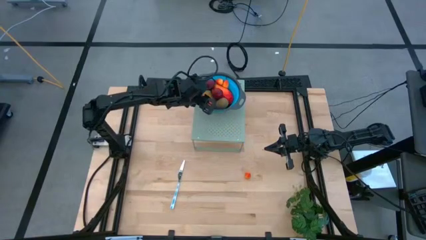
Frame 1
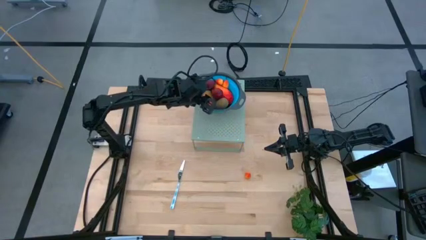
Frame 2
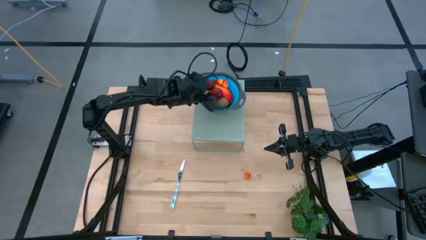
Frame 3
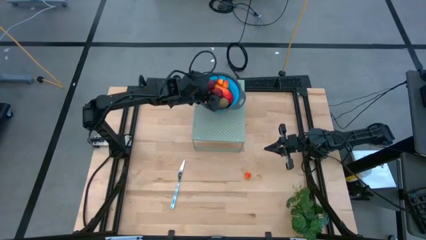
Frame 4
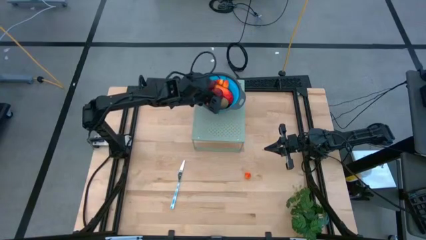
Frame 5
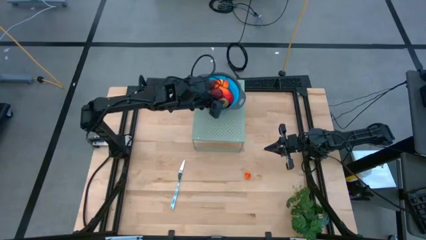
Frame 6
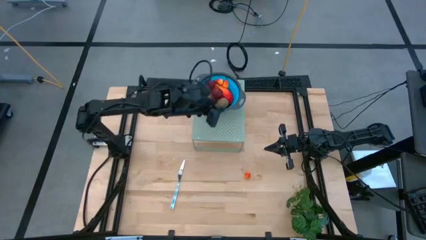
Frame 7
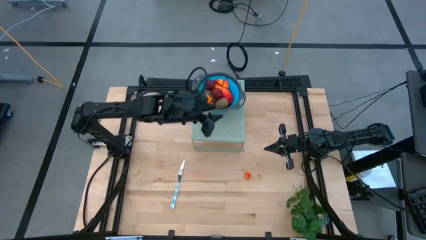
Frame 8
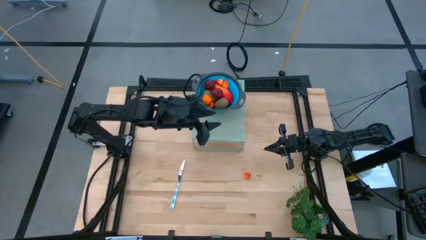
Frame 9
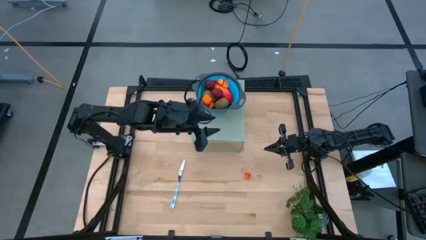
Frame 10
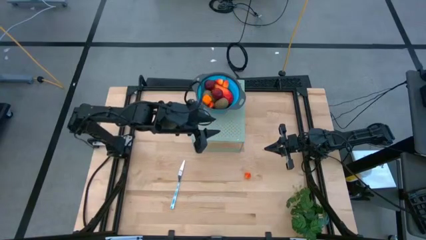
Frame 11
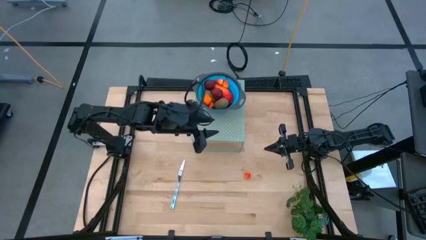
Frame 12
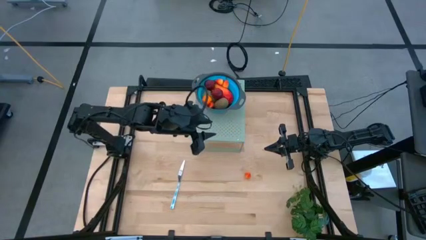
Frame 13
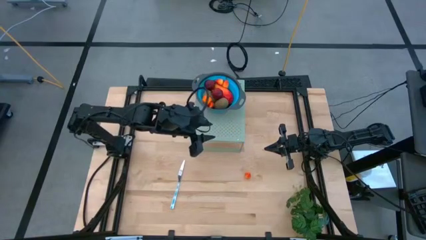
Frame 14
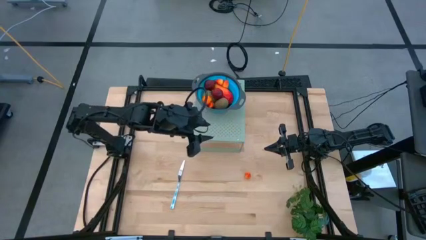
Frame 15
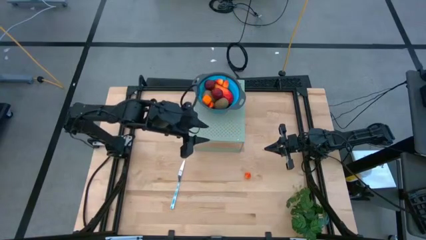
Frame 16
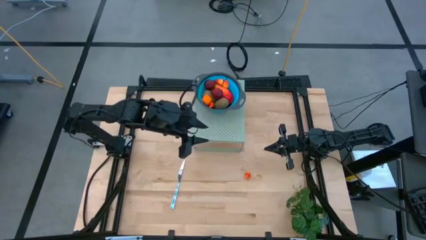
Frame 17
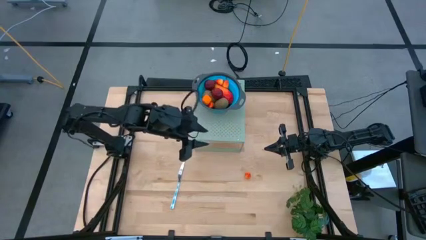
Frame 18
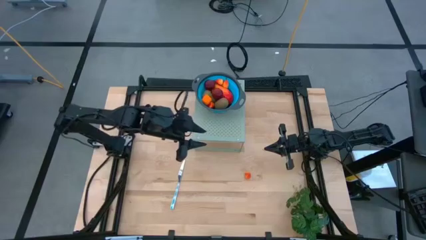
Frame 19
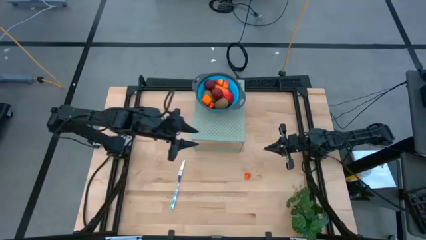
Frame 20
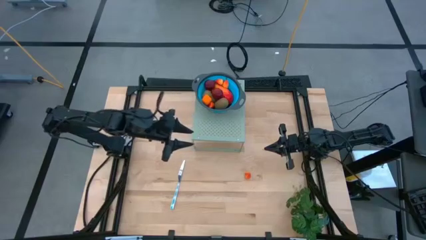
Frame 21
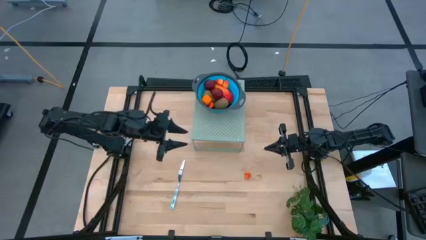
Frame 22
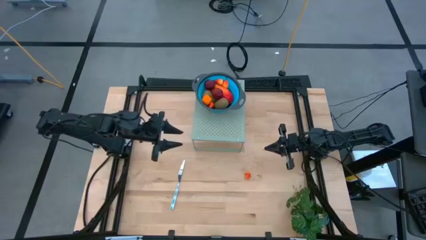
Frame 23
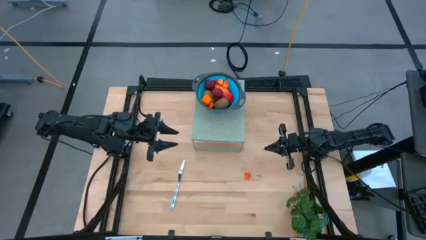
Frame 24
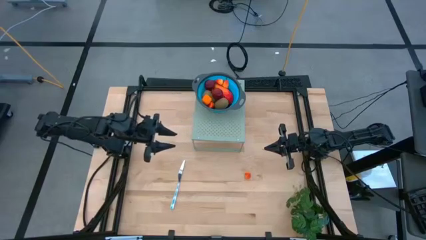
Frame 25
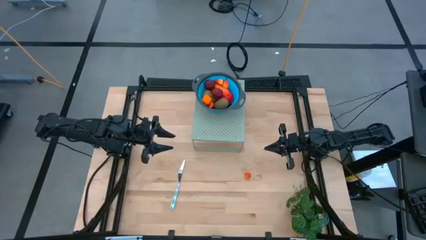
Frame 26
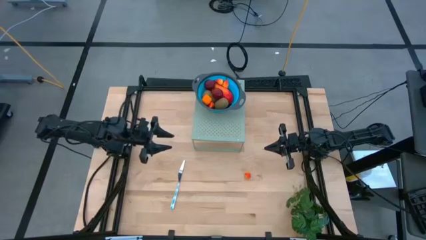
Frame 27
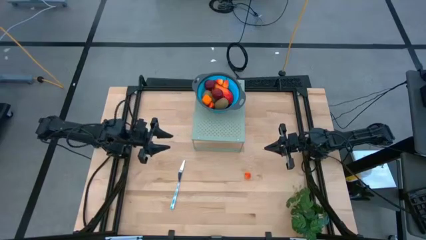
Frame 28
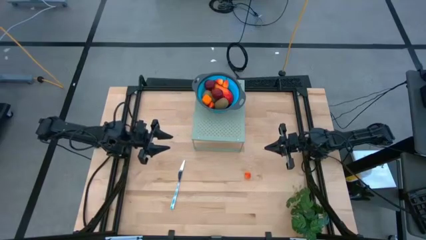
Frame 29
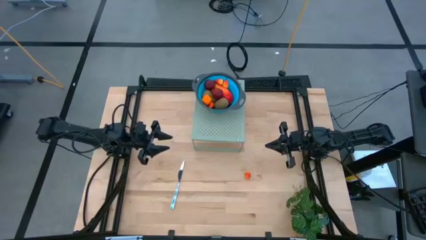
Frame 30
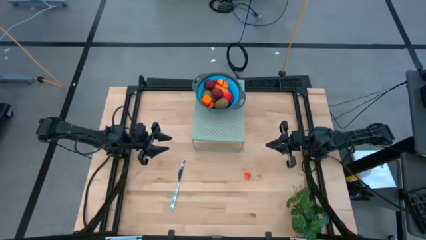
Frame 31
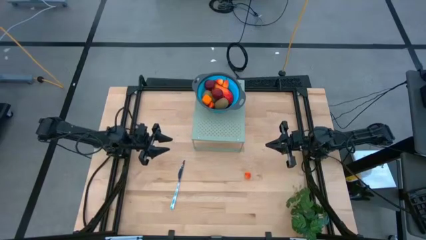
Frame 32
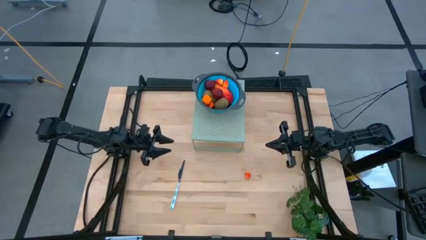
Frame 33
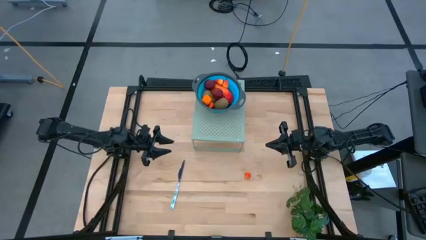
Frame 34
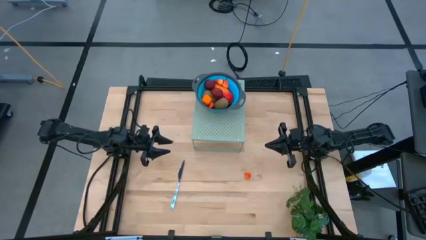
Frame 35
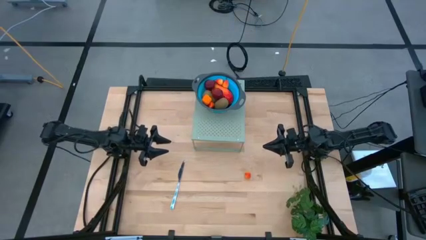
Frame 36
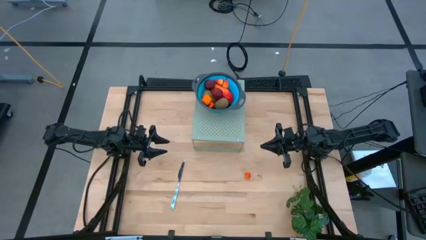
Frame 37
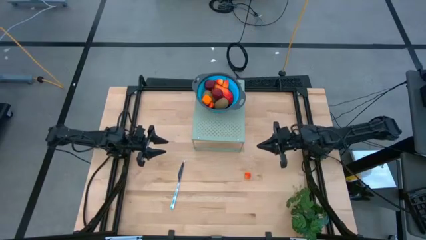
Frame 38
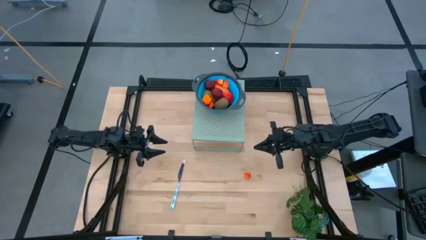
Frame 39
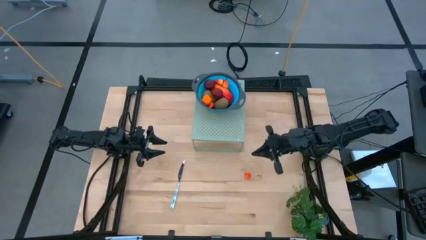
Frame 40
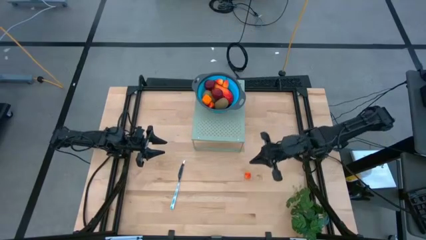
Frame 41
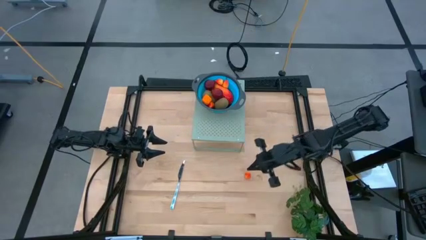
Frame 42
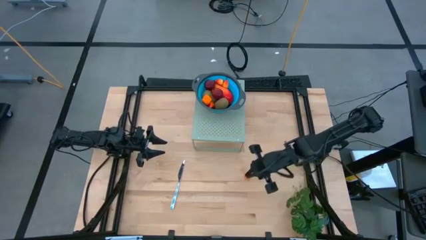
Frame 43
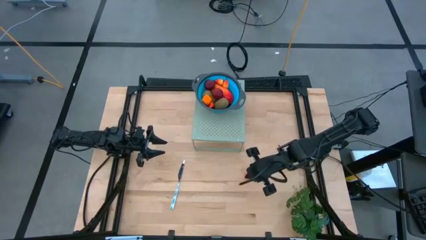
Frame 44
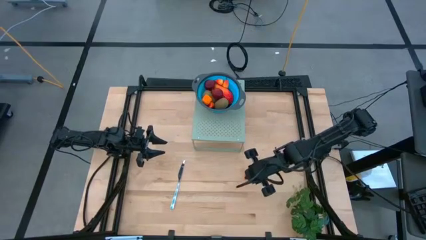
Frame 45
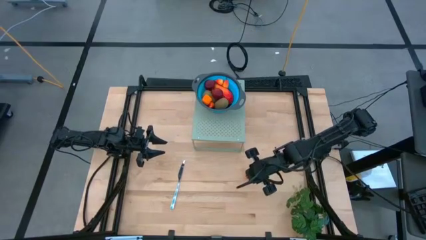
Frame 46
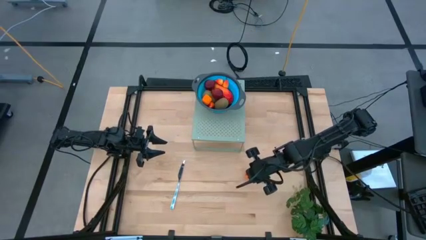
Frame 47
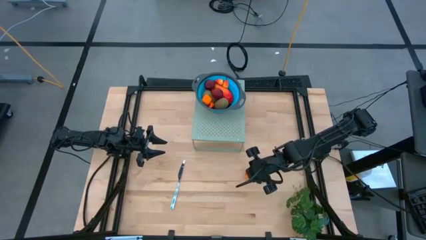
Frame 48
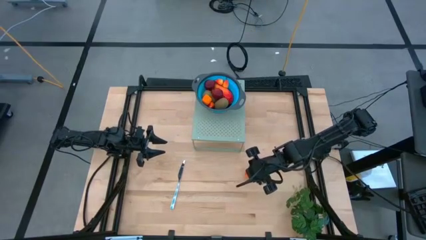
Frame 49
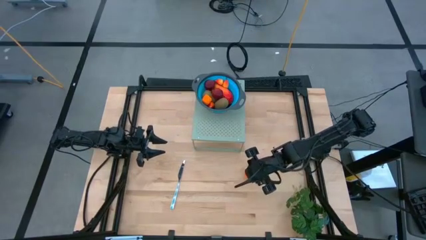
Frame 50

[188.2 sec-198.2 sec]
Task: Pick & Place Fruit
Put the Peach into the blue strainer bowl on the shelf

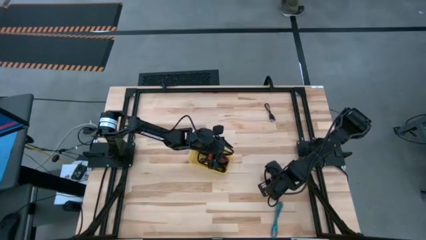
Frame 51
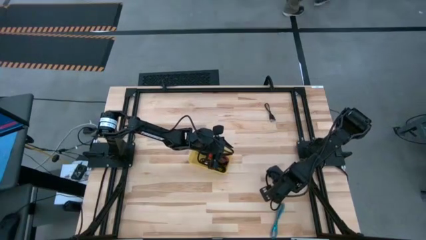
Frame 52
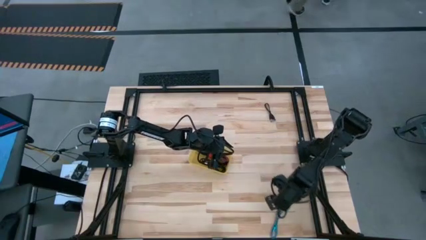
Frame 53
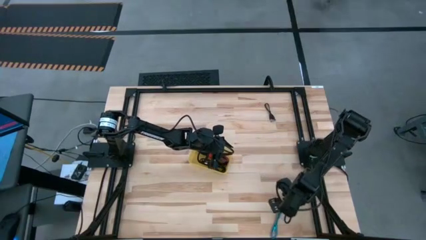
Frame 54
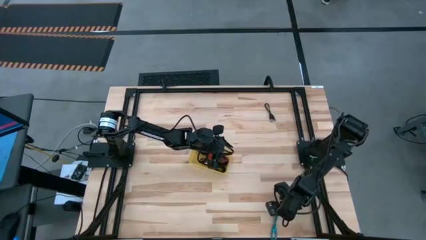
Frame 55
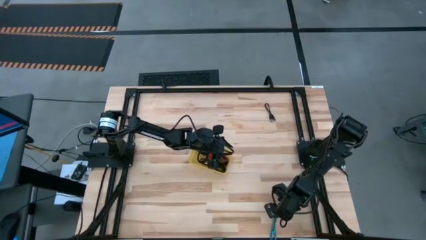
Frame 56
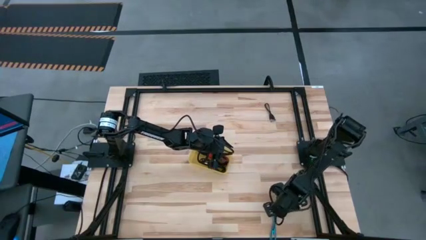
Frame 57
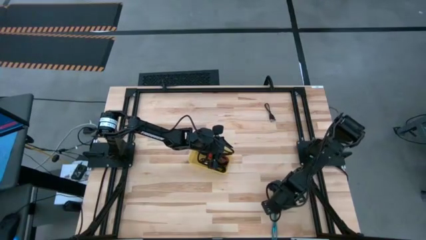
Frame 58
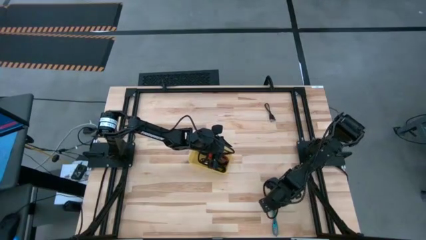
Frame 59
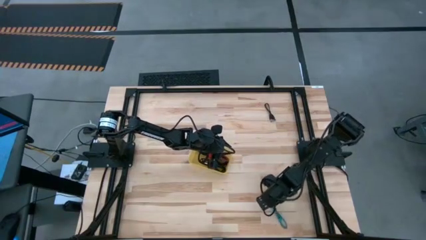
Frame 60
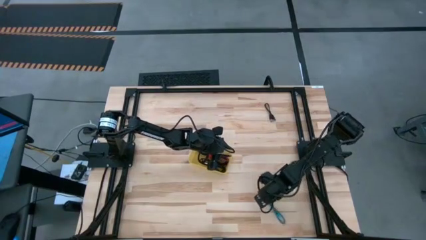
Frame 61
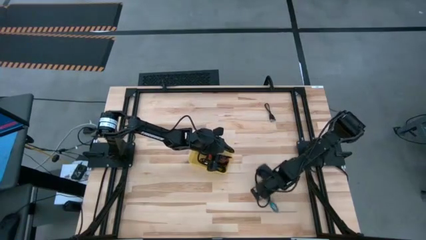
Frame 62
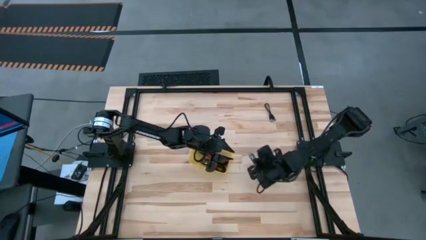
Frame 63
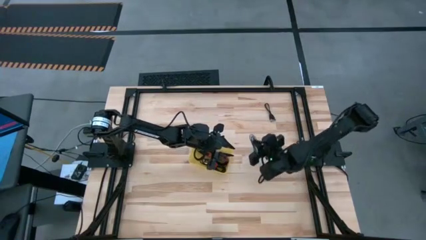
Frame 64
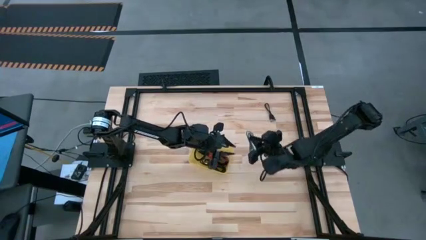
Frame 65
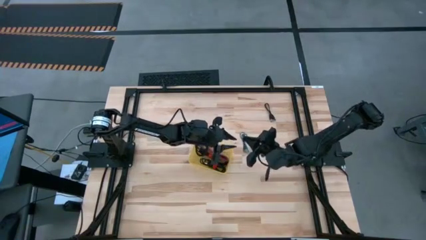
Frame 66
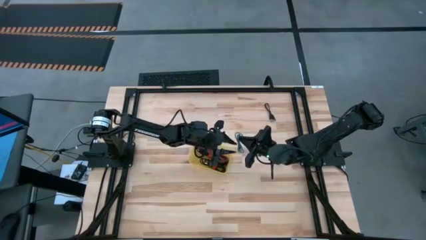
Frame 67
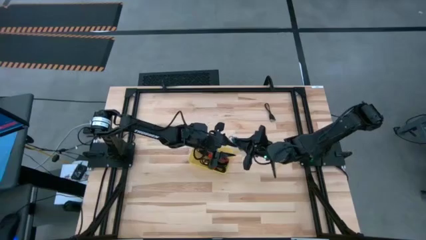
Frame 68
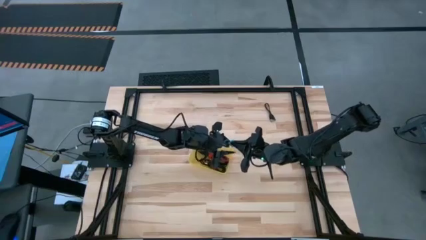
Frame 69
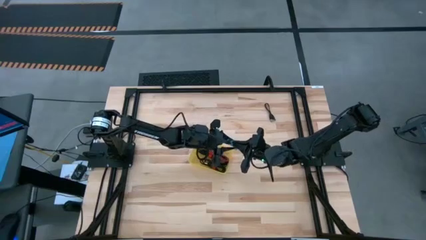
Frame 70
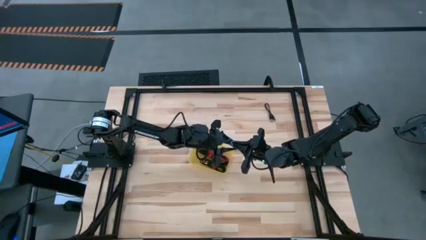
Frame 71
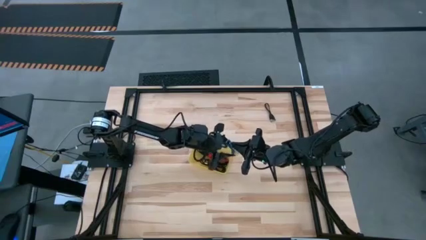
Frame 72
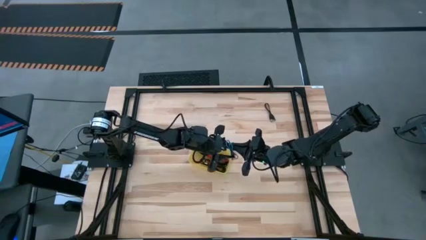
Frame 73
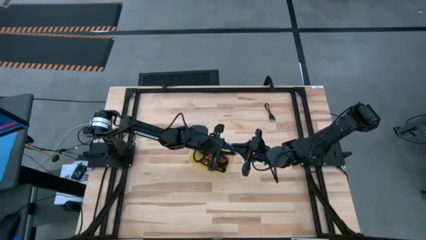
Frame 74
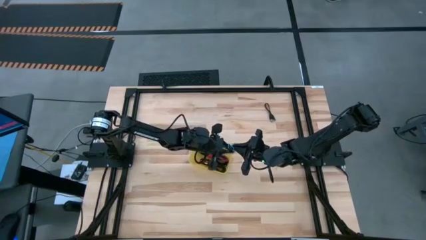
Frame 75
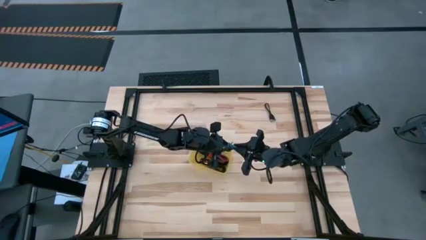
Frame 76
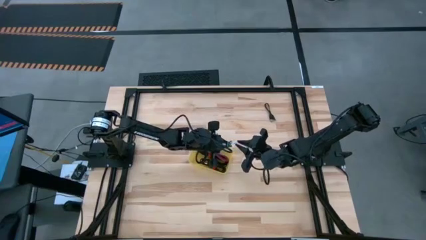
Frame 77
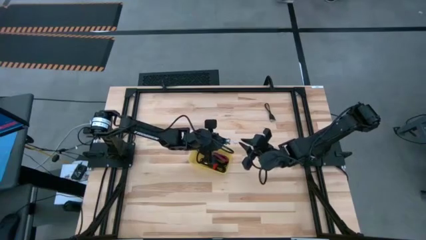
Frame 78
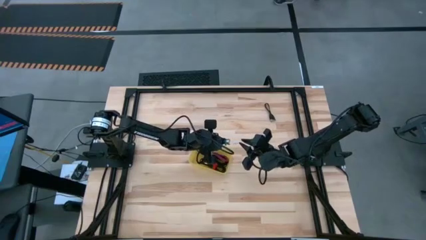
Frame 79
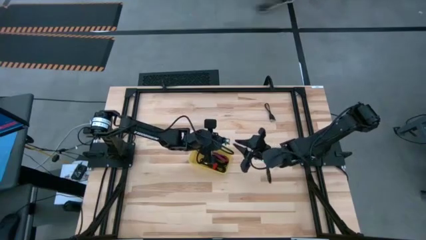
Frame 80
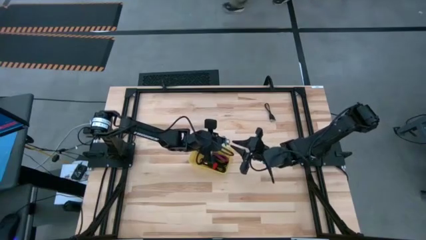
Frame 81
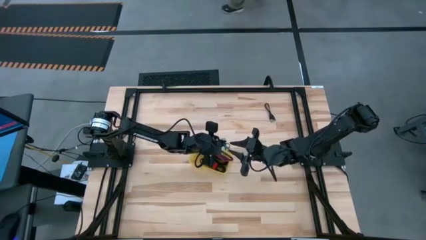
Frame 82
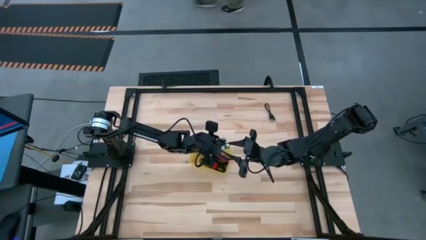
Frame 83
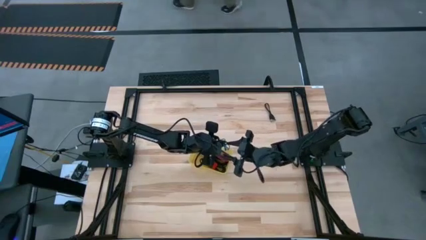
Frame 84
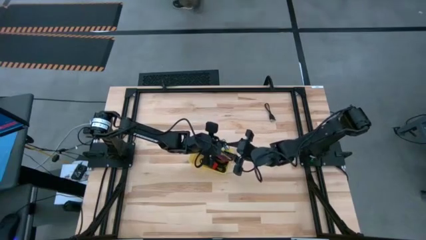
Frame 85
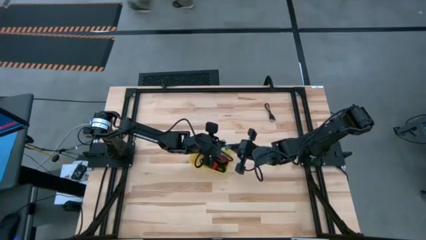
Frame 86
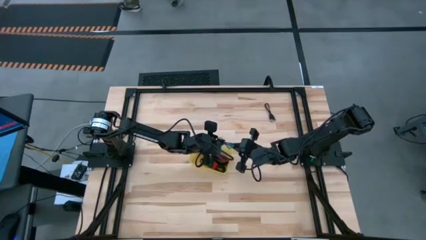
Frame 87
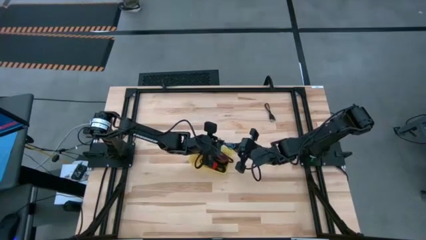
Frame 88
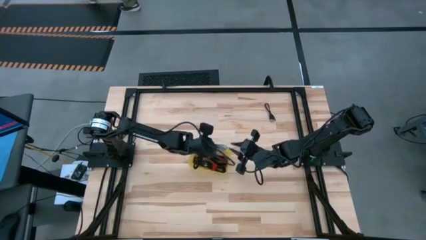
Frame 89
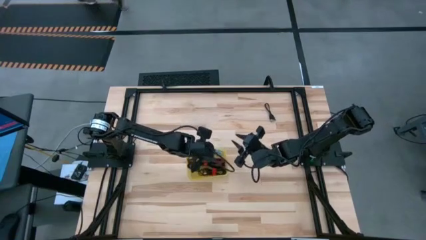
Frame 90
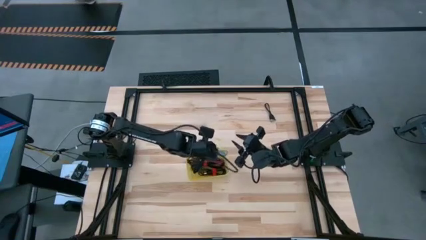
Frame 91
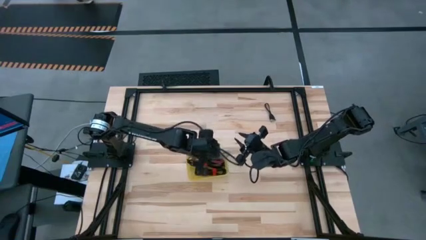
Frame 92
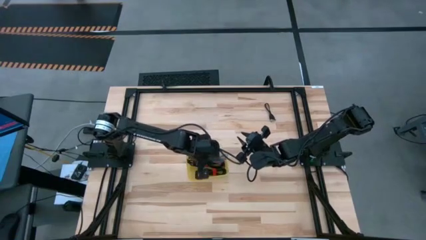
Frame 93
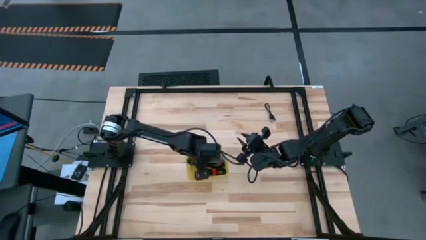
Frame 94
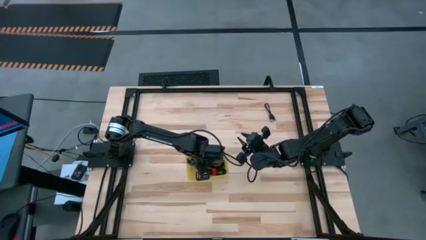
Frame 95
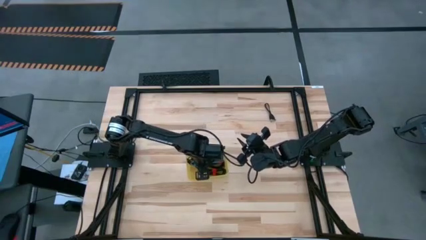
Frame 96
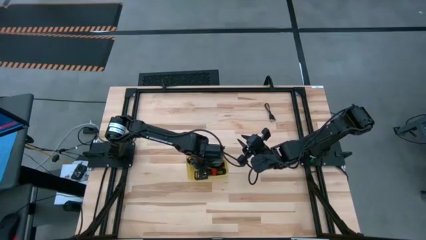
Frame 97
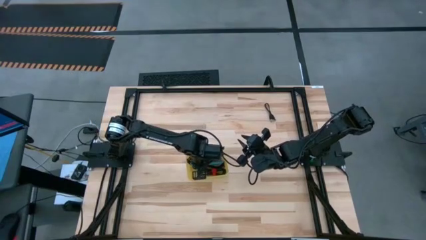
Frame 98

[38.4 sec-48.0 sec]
Task: Pick and place USB-C Cables
Put the blue charger cable into the yellow bin
